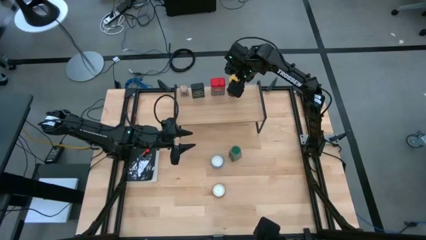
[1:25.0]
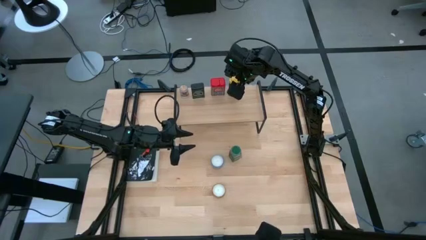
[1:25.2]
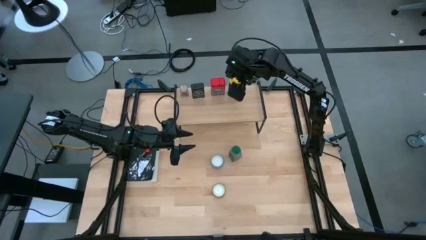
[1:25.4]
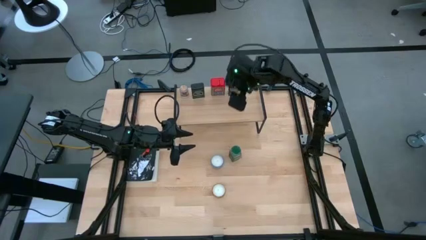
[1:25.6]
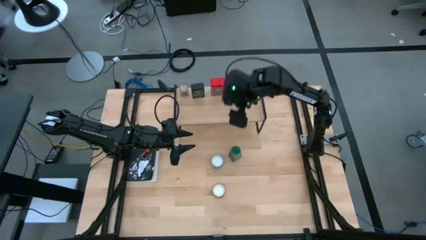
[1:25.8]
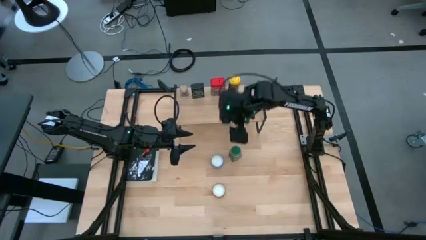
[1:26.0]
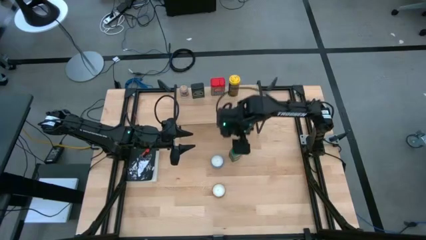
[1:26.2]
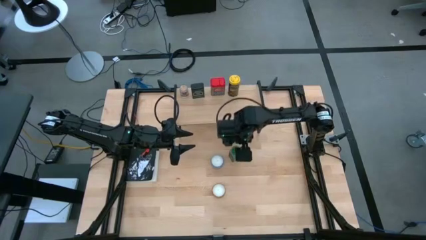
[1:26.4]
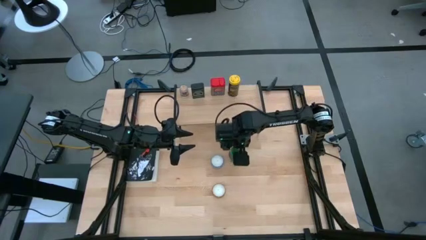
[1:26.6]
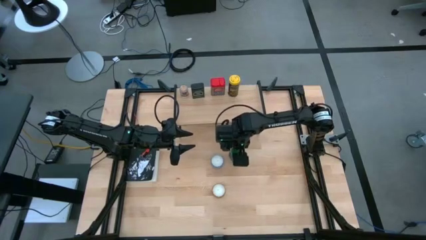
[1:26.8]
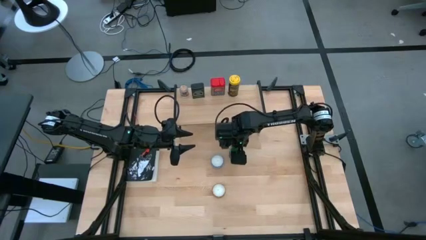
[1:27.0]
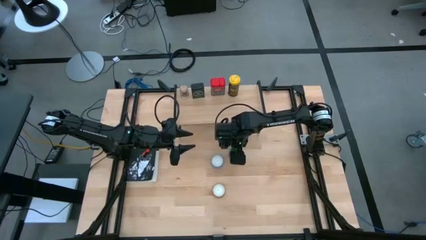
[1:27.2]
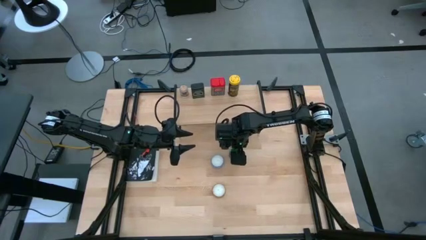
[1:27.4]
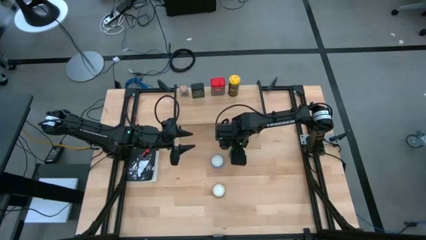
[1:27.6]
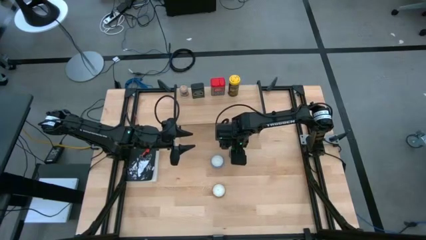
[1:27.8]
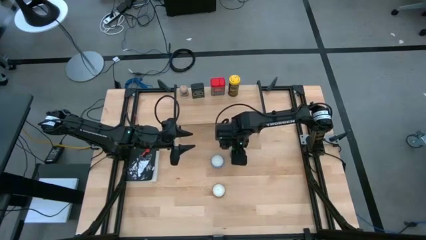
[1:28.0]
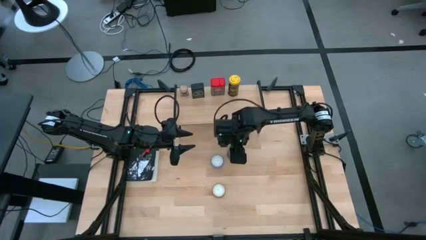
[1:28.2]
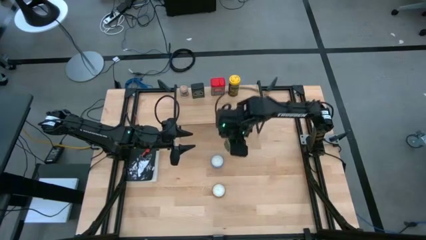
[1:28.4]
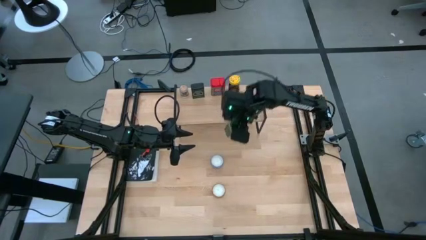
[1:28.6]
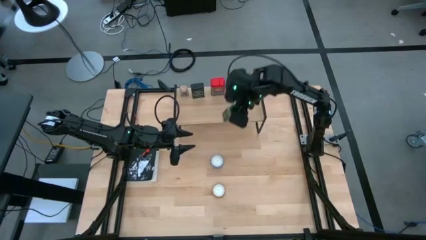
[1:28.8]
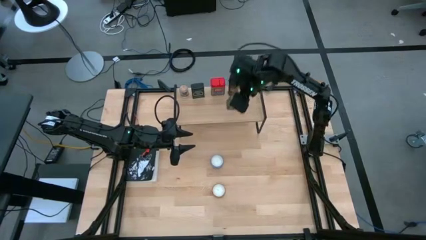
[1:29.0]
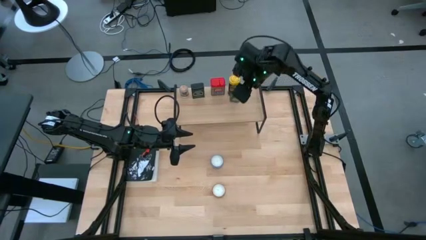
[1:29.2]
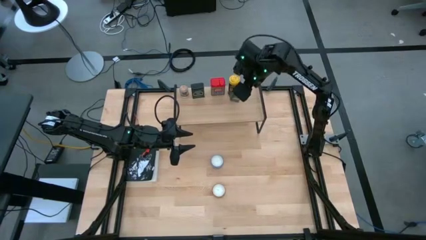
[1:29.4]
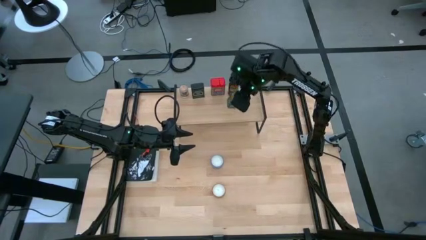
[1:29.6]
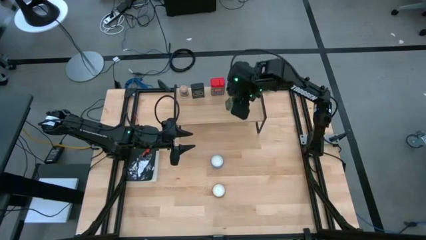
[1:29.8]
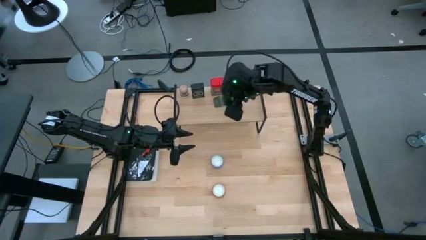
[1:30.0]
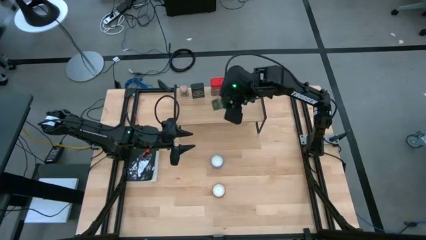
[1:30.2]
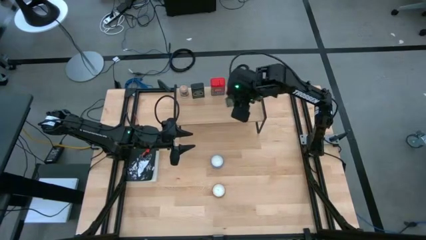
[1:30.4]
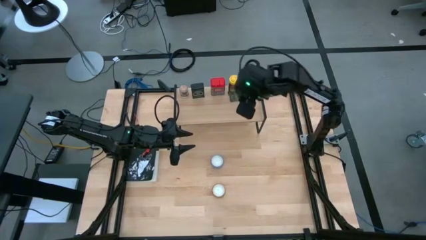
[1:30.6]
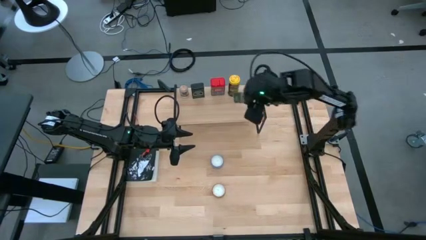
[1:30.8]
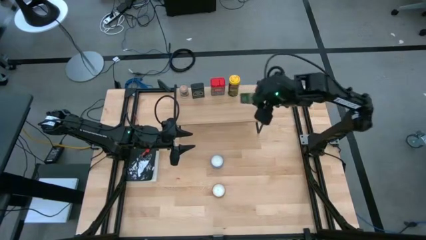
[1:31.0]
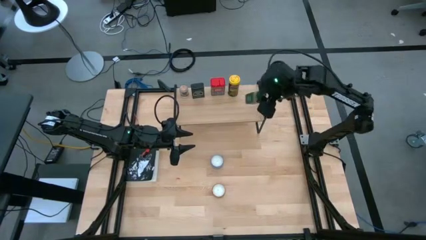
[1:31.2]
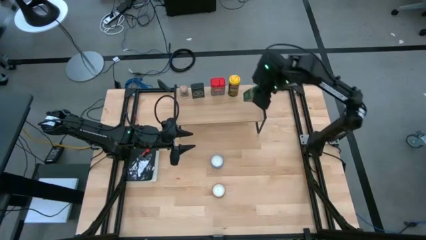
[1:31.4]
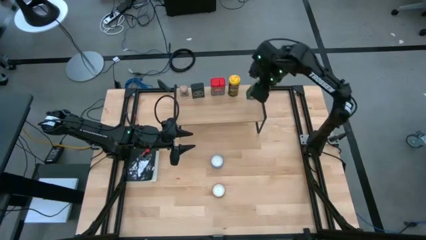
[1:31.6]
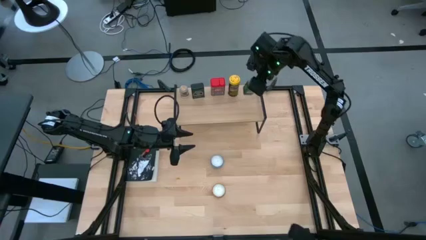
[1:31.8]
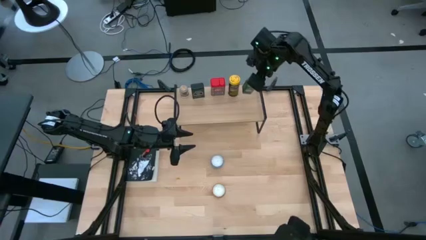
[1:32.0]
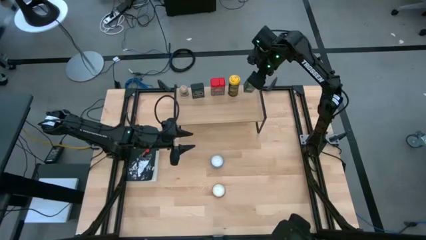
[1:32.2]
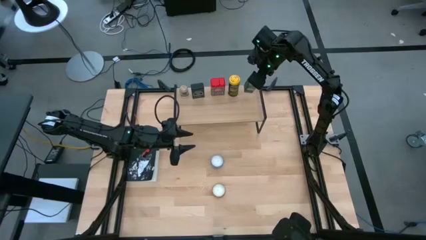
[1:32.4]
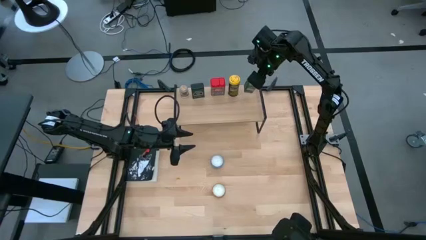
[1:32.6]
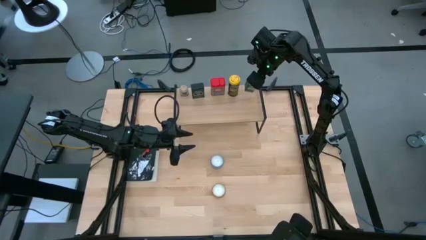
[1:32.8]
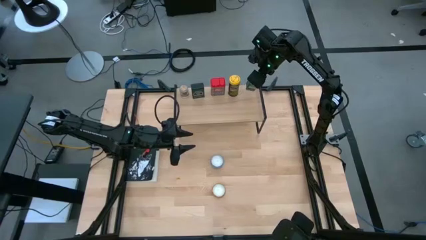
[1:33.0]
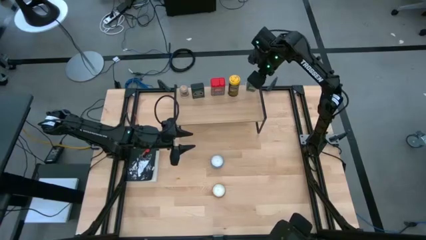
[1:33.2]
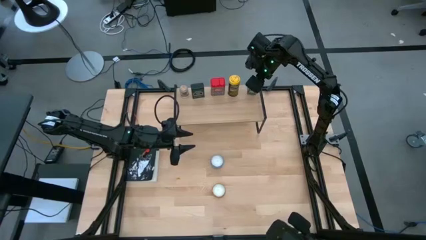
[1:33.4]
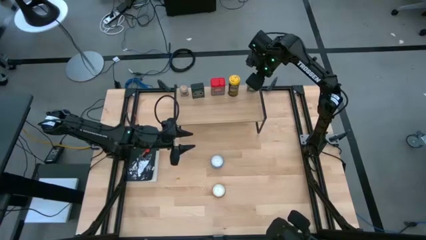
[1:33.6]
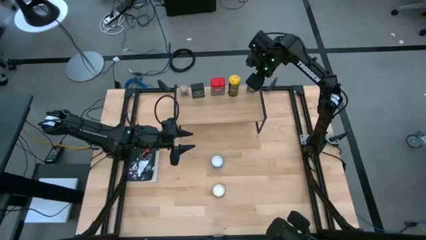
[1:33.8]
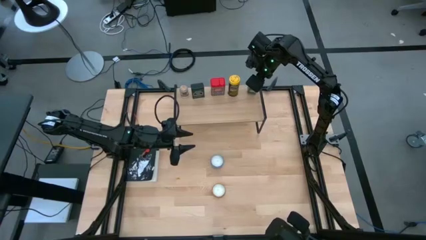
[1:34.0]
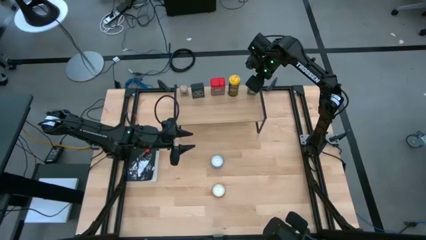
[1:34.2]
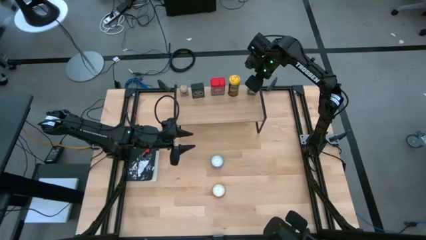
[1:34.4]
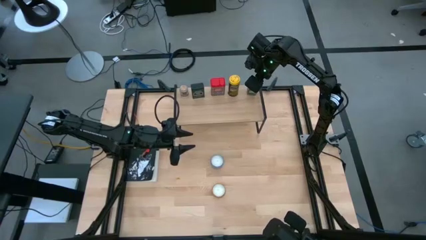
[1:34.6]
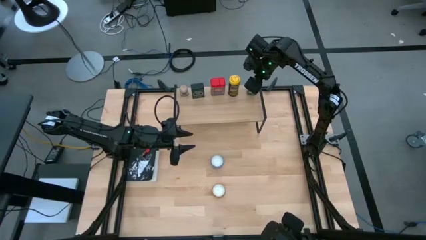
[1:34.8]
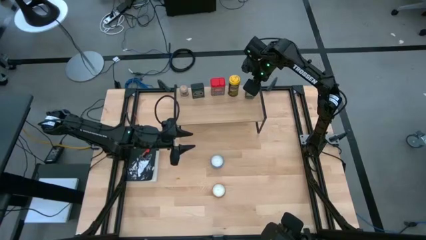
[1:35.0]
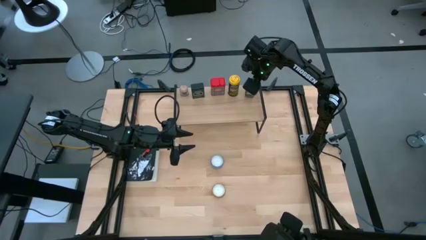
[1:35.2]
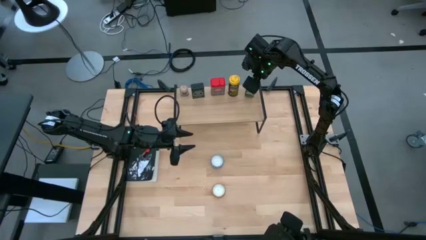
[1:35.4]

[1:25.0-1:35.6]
Task: Shelf spices
Put the green seasoning bottle on the shelf

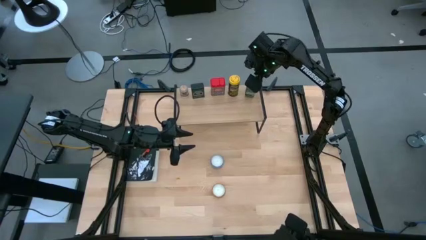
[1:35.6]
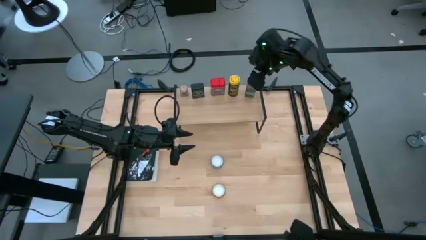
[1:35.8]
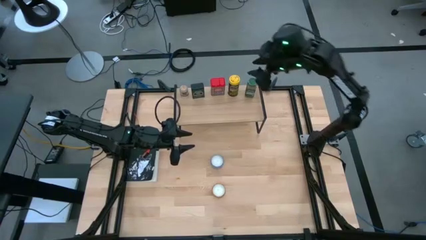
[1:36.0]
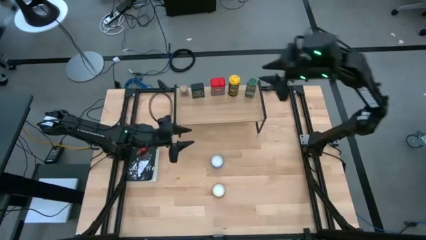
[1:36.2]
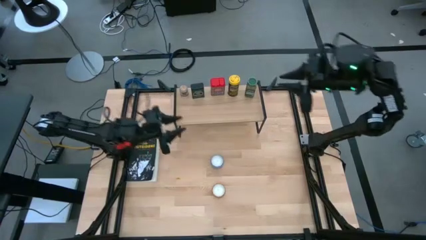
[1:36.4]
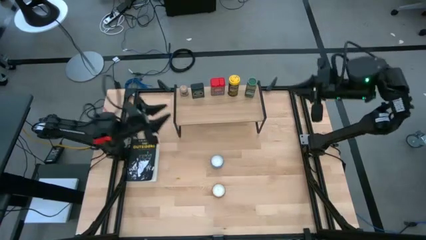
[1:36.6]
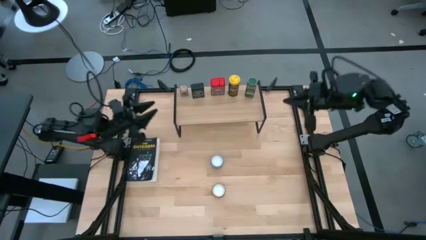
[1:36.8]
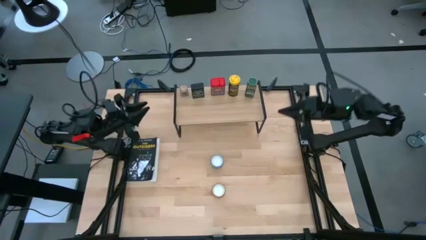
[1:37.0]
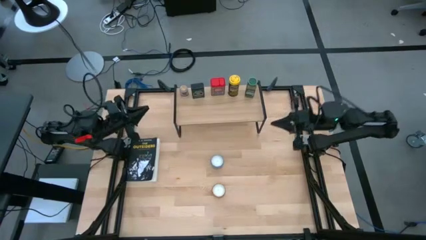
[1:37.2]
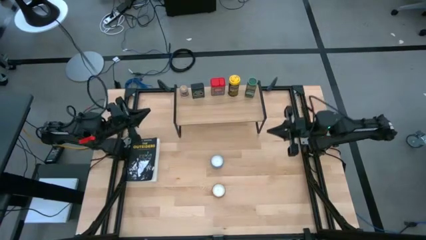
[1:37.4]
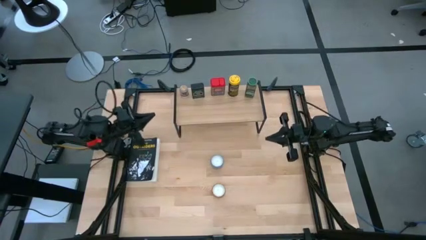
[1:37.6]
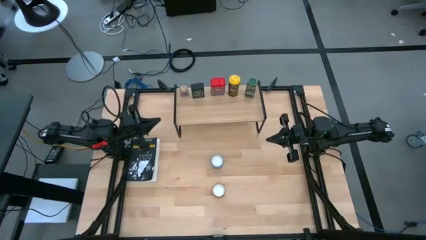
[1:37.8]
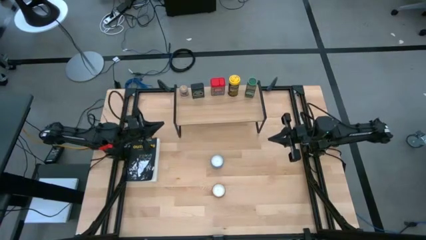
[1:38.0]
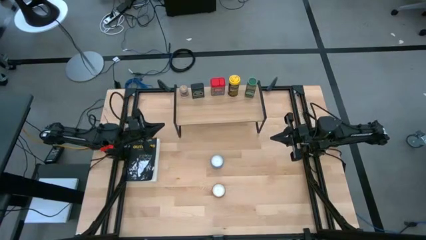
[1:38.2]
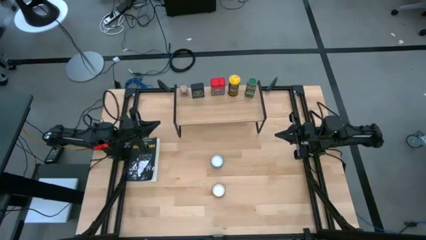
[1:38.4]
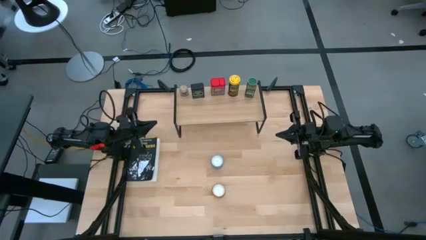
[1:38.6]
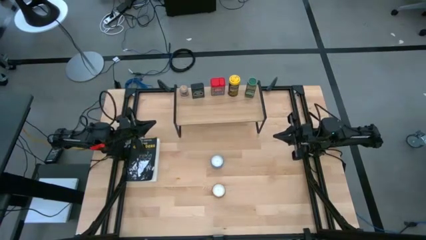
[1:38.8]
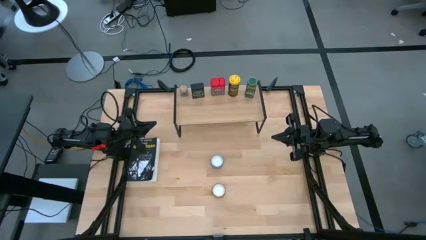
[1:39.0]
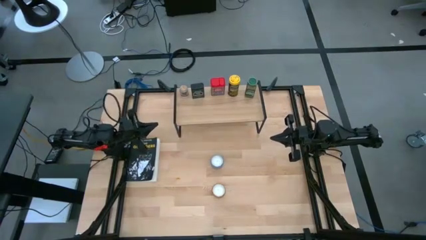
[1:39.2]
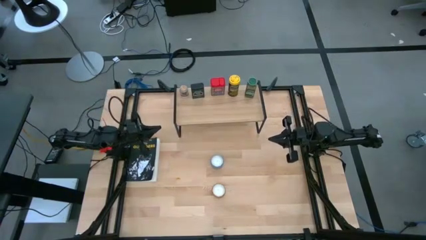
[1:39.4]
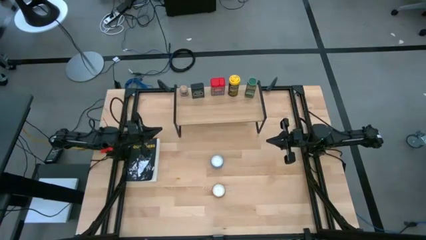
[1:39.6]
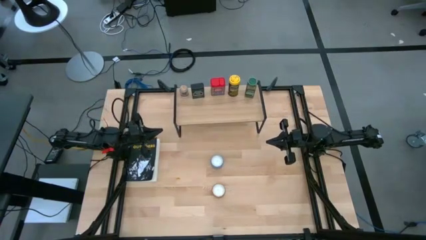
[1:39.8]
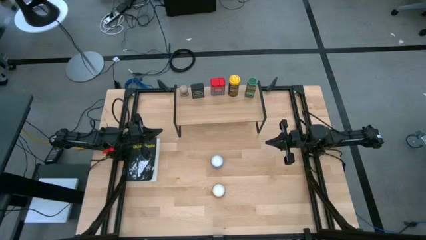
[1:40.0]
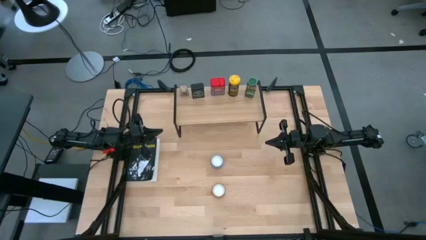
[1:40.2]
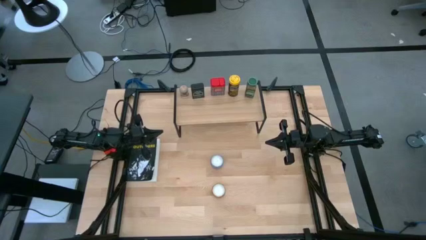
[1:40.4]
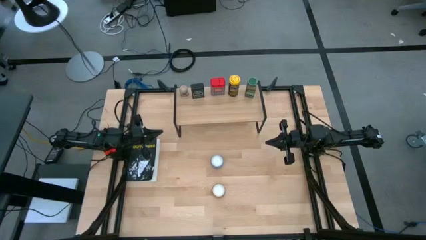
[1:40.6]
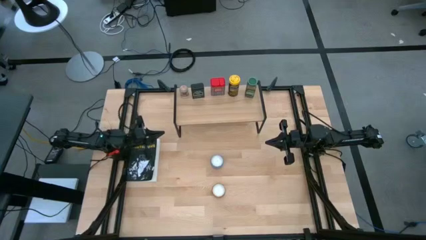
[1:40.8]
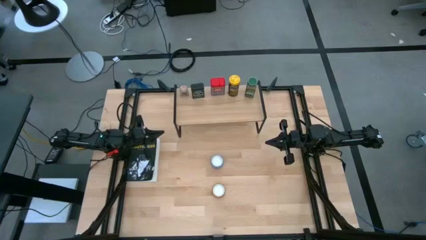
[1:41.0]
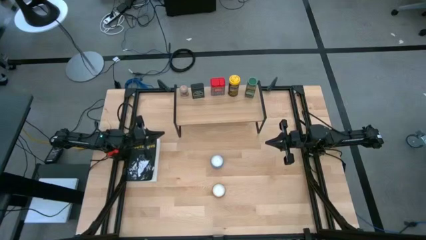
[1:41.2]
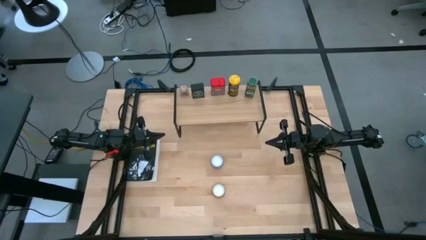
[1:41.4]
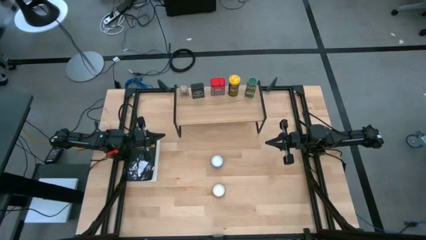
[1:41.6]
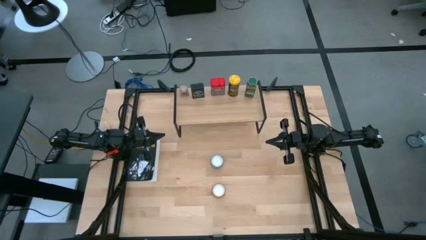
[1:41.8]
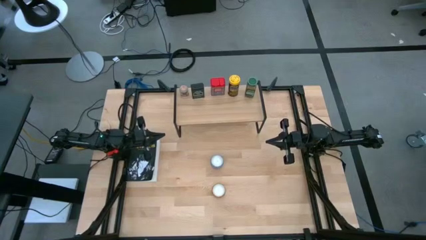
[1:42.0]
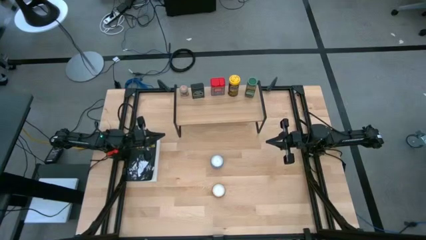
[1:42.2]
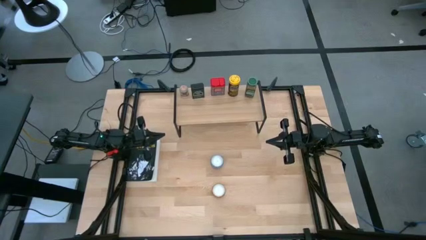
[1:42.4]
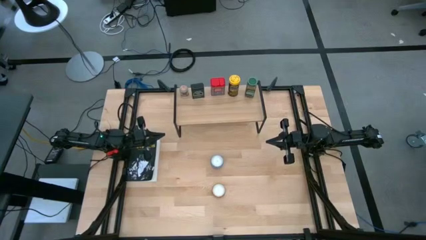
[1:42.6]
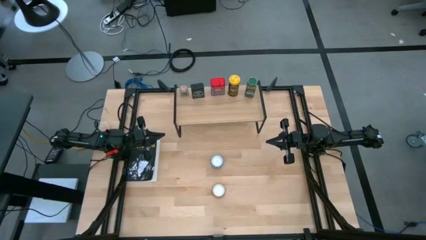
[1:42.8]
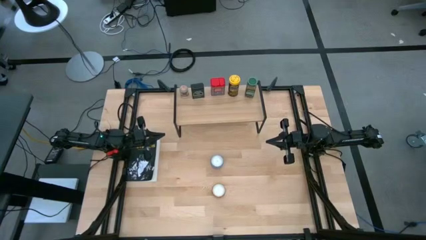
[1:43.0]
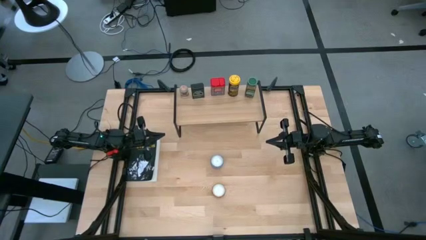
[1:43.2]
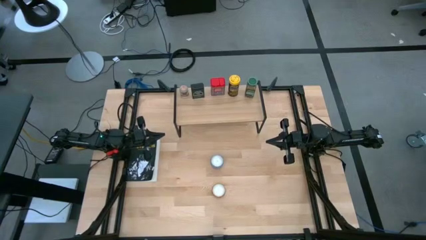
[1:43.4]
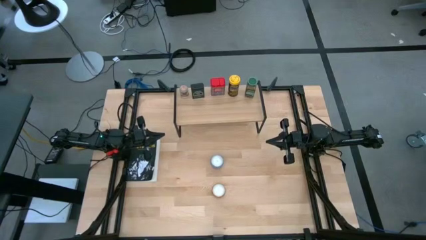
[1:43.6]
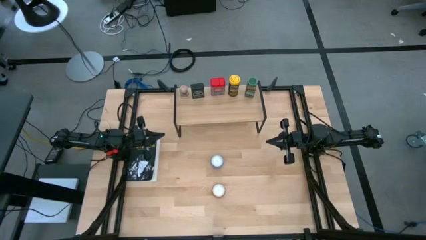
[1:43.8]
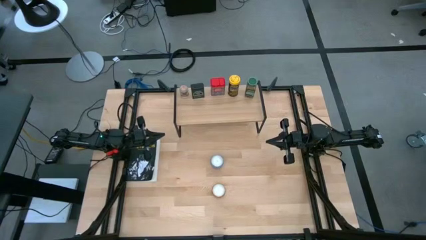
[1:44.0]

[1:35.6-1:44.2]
Return to Home Position
